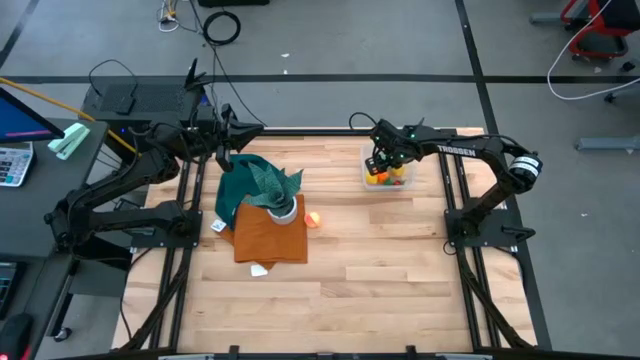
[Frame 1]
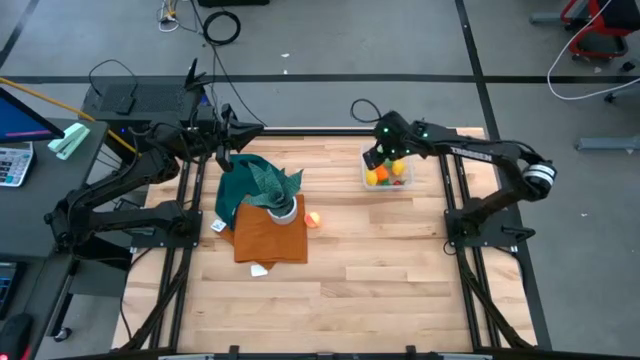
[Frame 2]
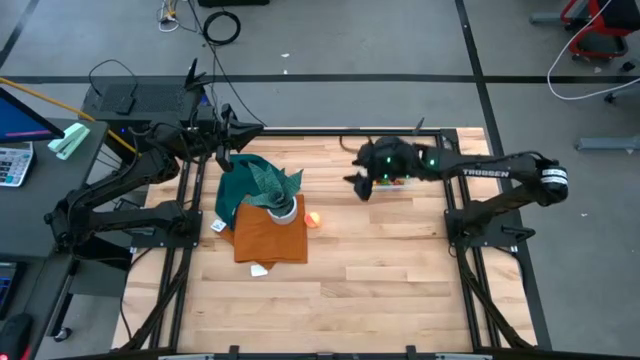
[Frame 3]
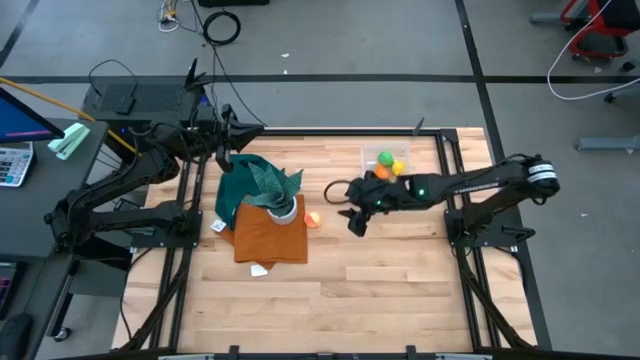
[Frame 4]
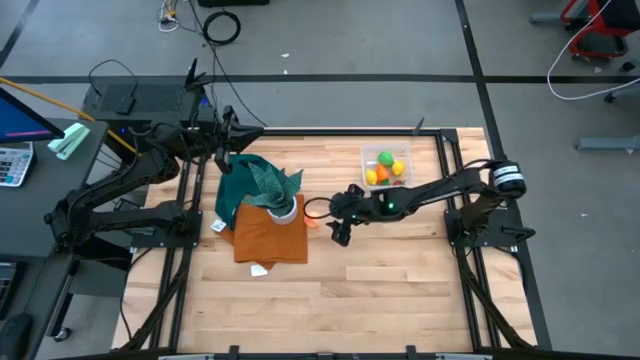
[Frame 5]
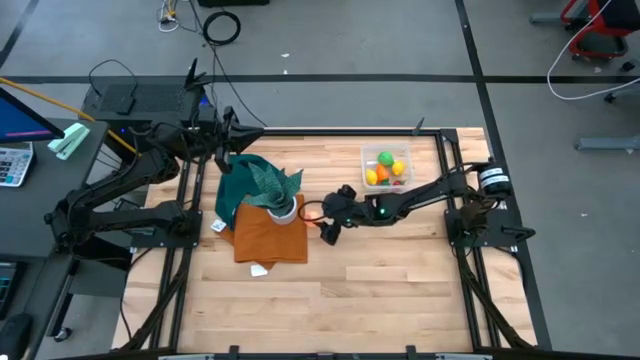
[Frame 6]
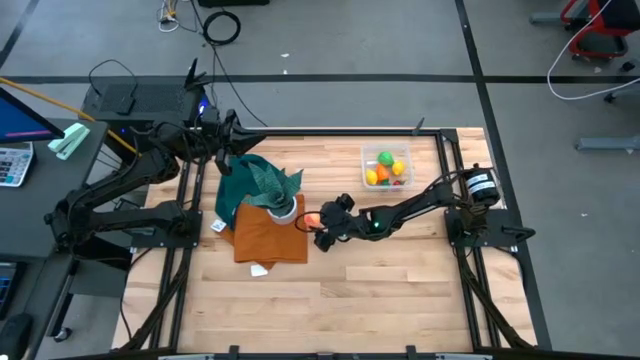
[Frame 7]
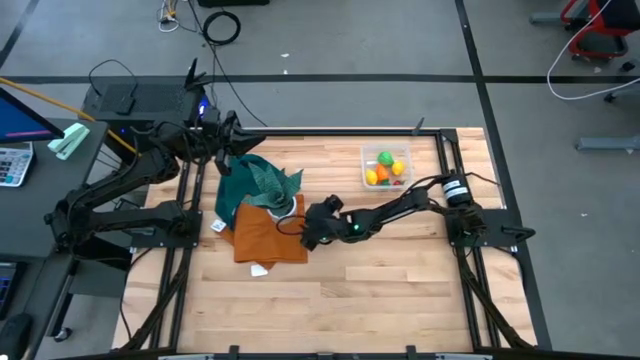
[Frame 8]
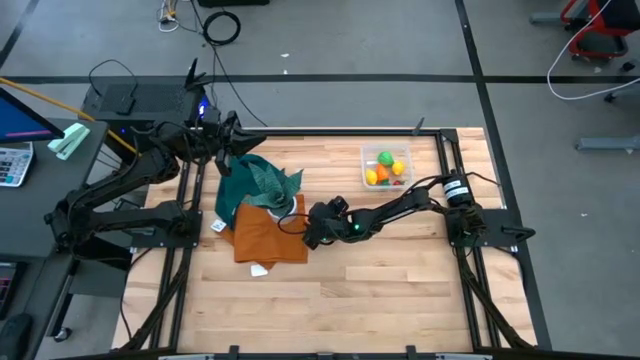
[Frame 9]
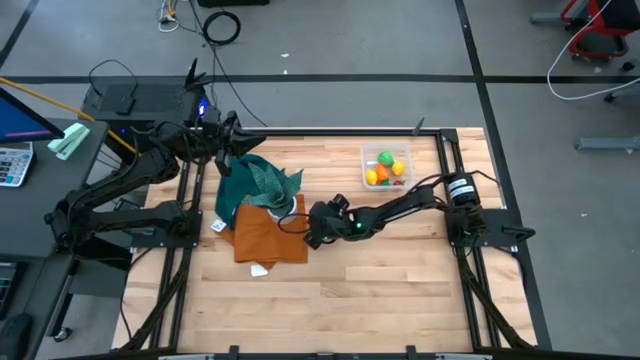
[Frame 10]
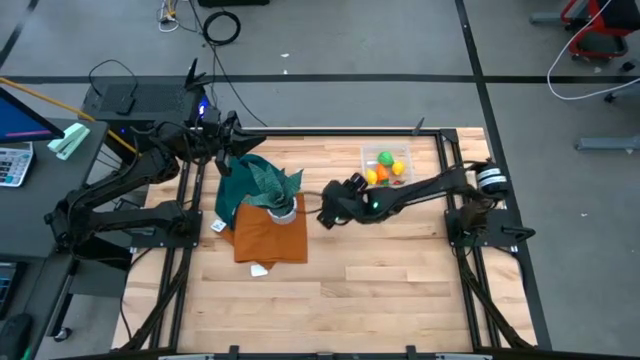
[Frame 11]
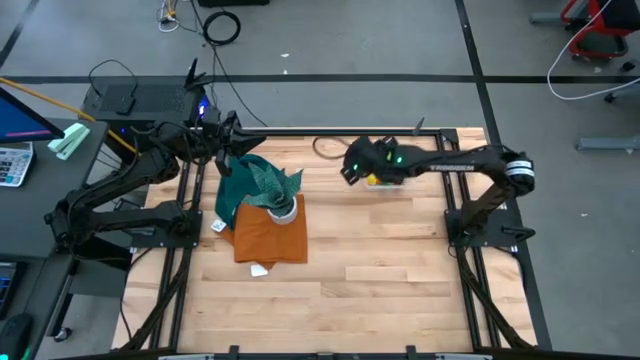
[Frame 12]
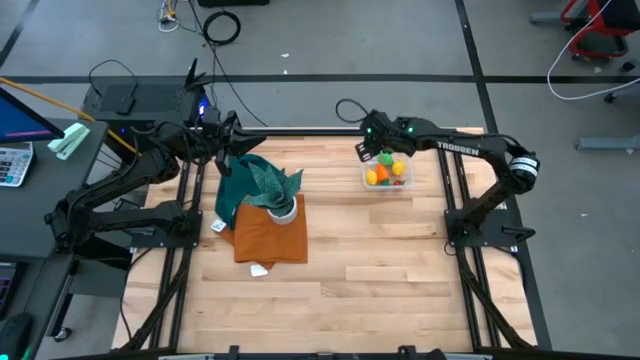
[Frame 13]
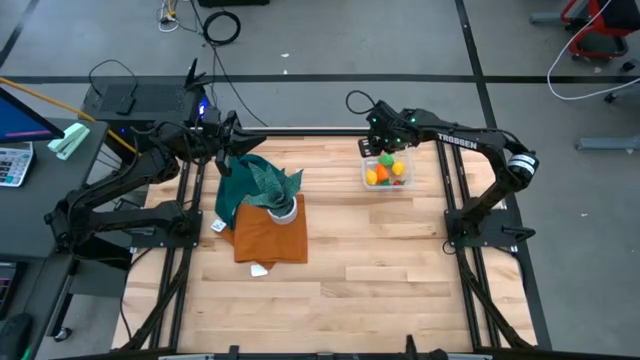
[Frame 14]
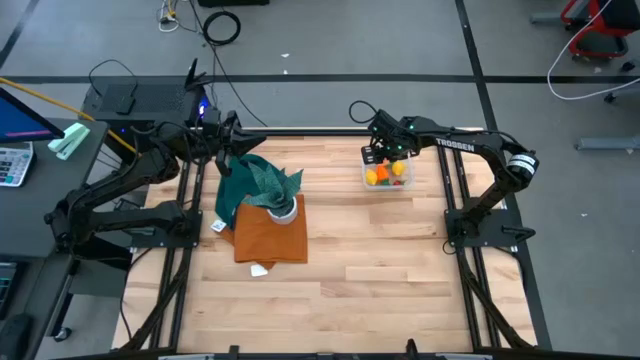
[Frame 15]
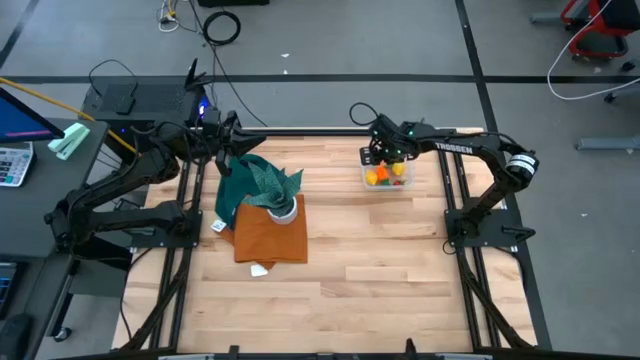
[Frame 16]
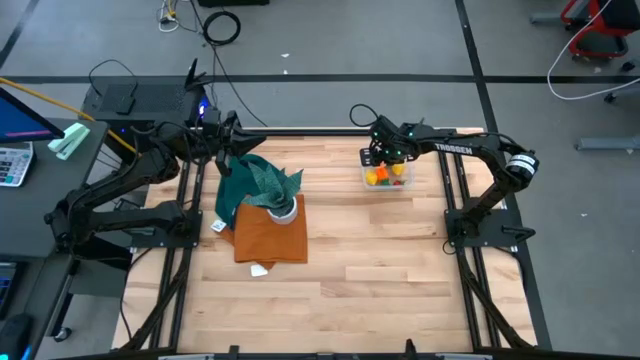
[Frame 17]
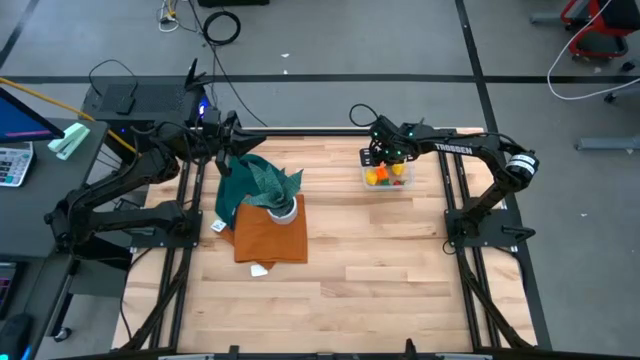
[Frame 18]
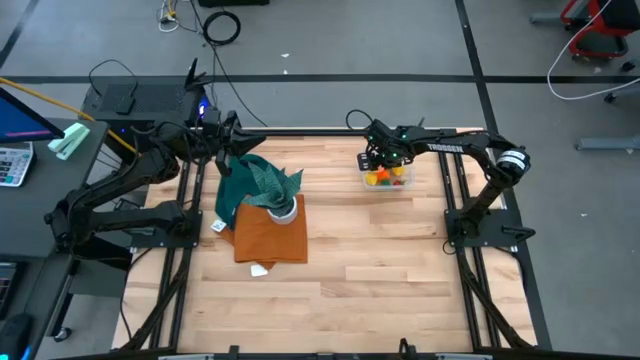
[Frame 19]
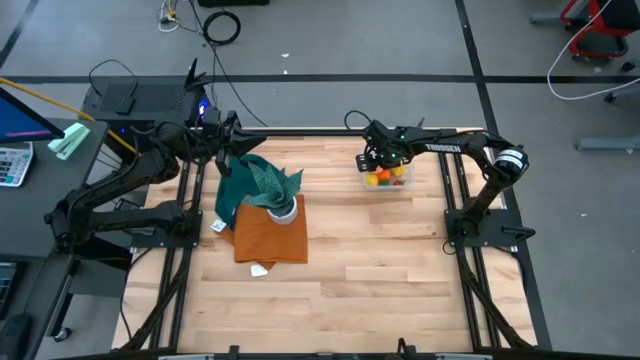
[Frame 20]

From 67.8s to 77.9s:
Task: Pick and placing Produce into tupperware
Put the peach into the transparent bin

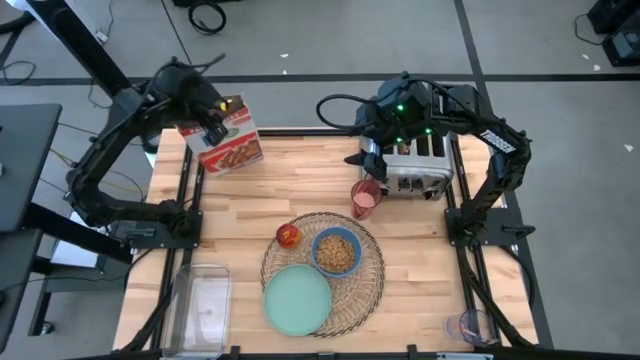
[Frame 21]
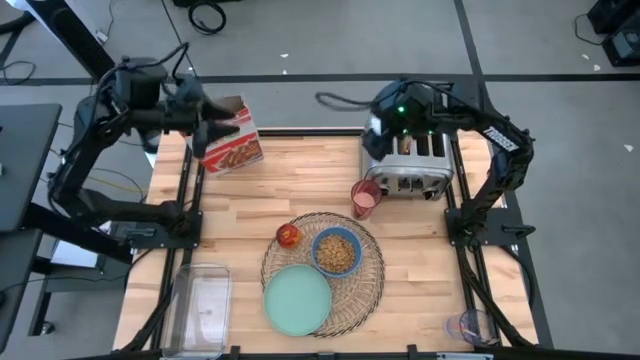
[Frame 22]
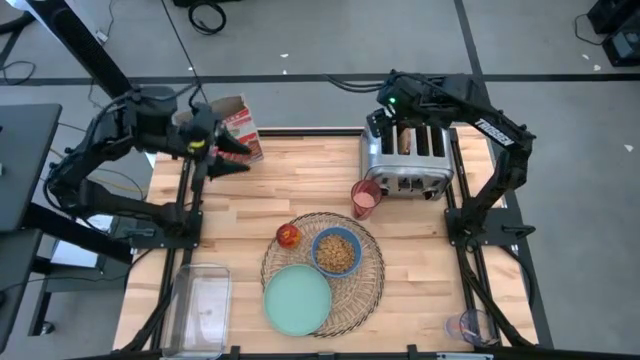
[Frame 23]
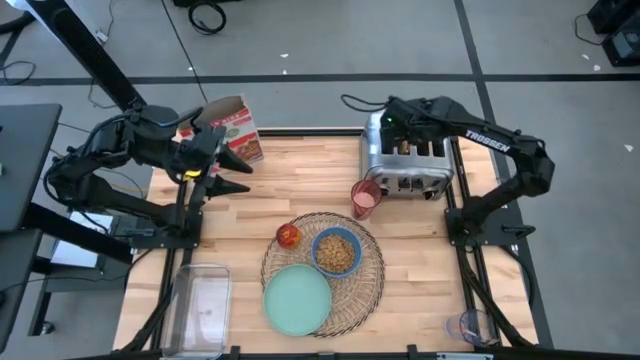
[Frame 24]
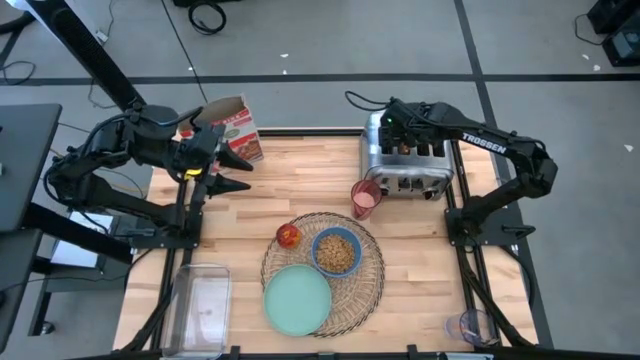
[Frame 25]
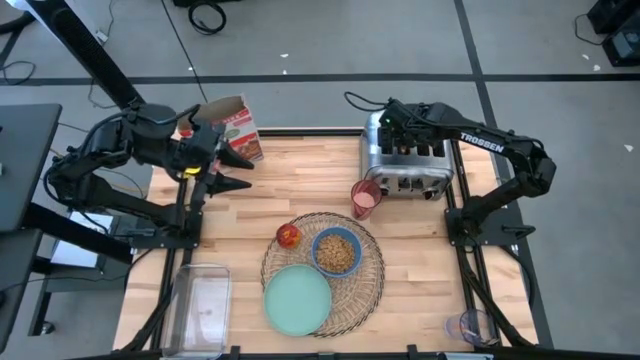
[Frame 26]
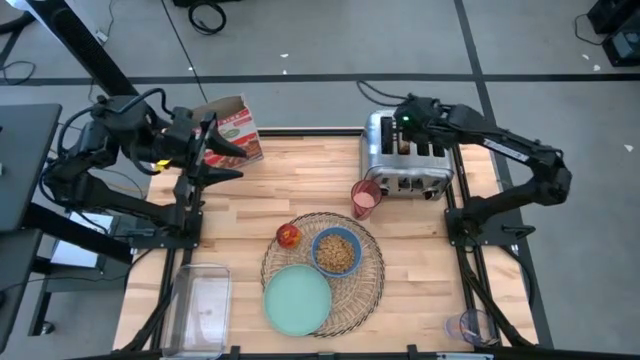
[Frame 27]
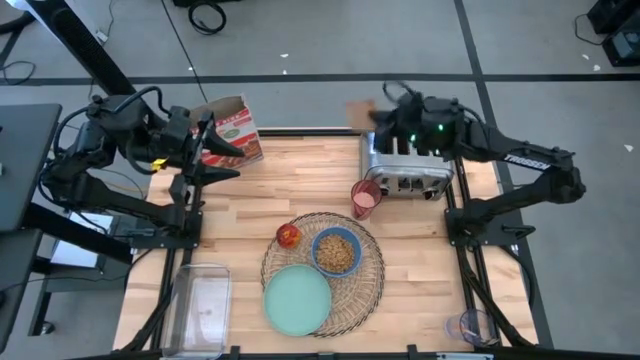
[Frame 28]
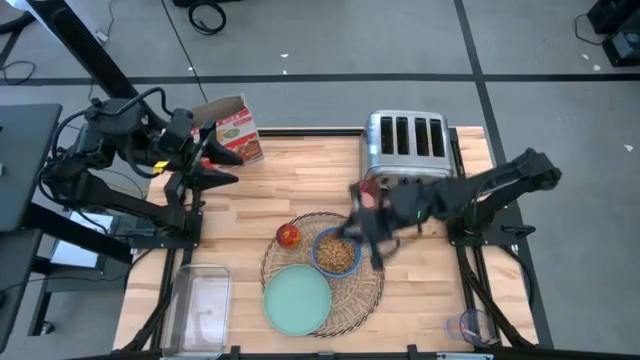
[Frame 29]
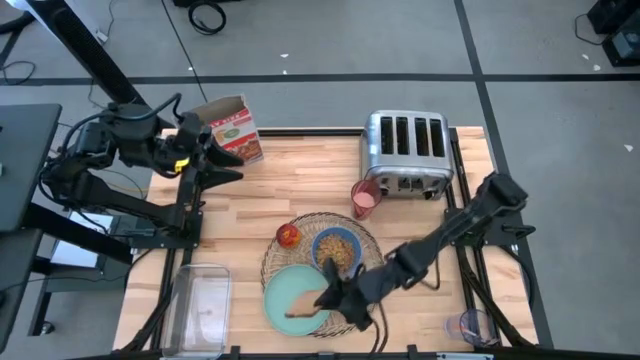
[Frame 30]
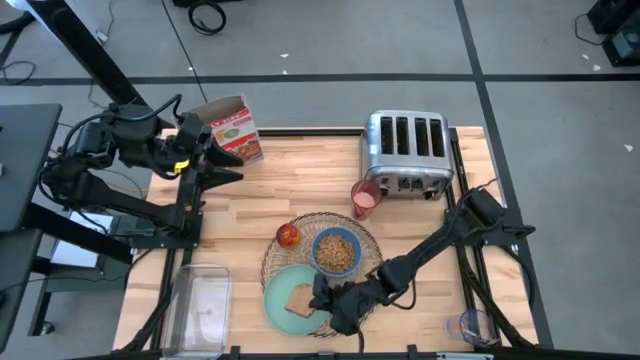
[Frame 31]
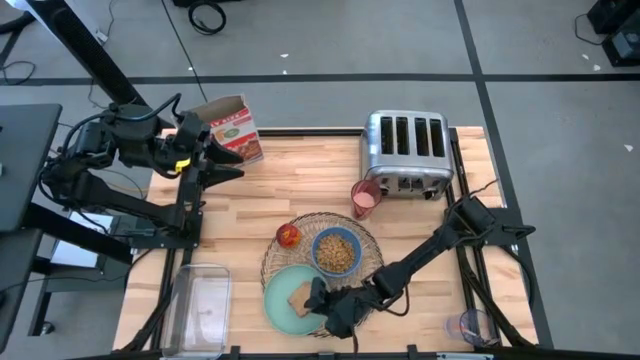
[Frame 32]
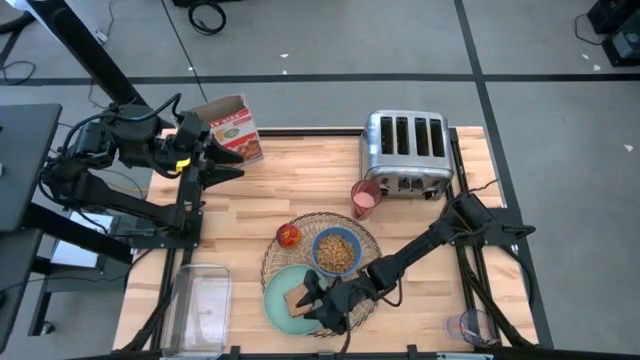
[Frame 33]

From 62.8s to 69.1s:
Task: Arrange a breakfast setting
Put the toasted bread on the light green plate
